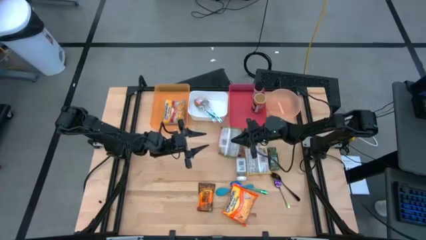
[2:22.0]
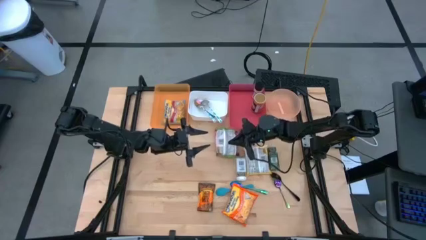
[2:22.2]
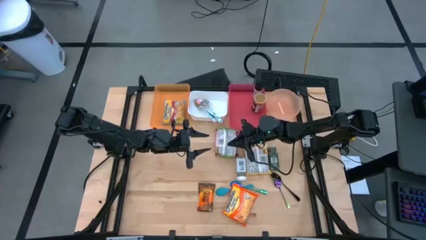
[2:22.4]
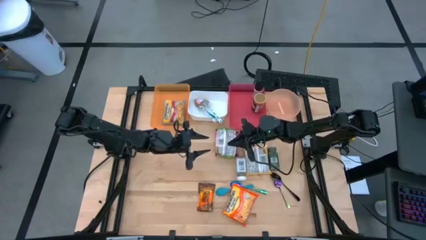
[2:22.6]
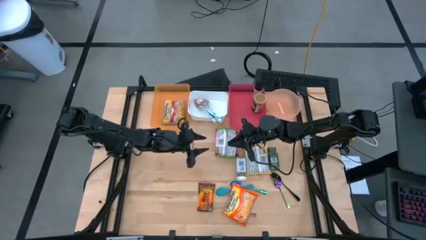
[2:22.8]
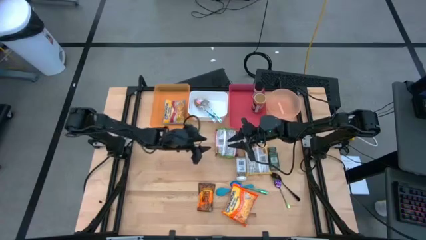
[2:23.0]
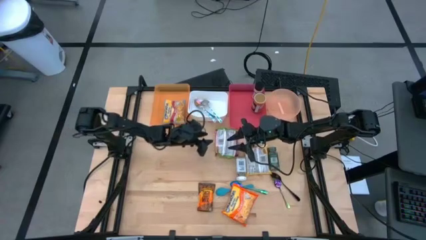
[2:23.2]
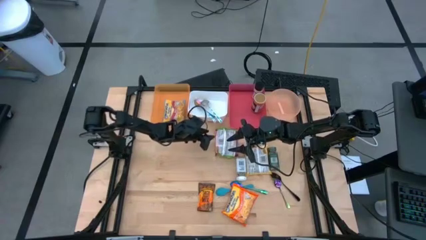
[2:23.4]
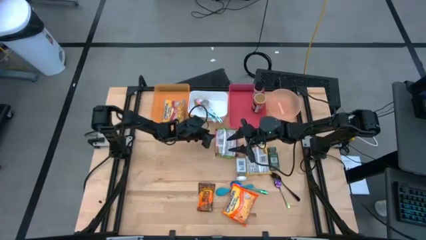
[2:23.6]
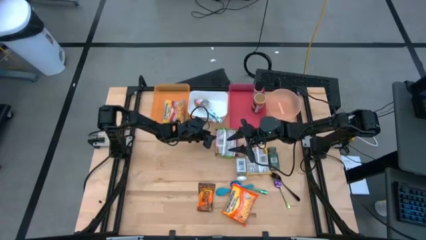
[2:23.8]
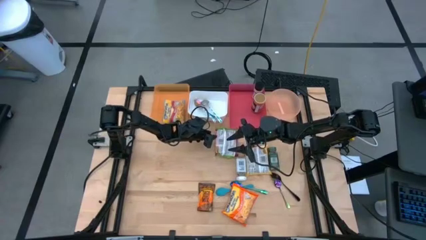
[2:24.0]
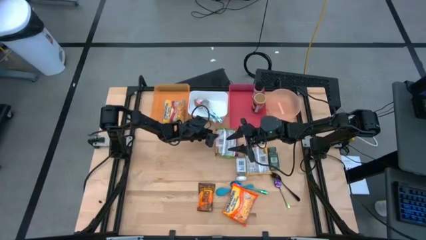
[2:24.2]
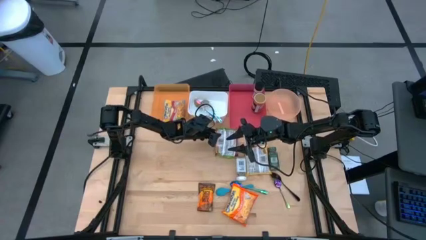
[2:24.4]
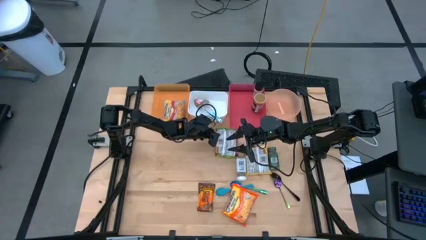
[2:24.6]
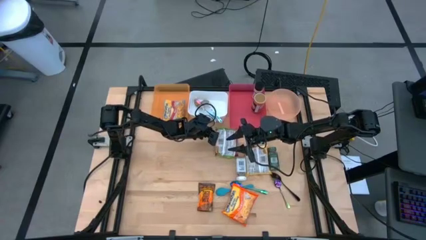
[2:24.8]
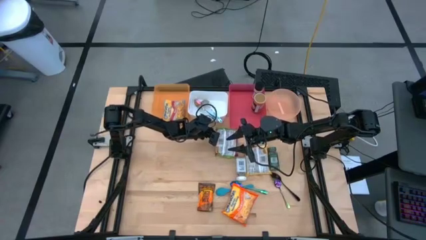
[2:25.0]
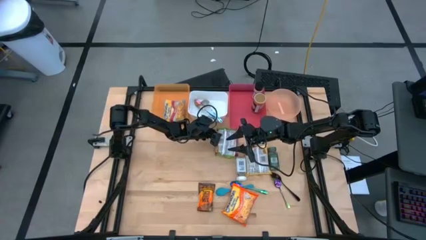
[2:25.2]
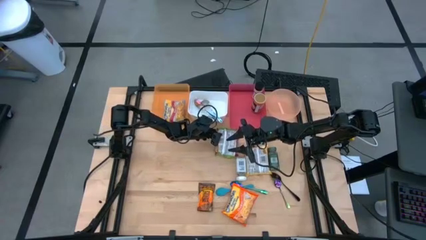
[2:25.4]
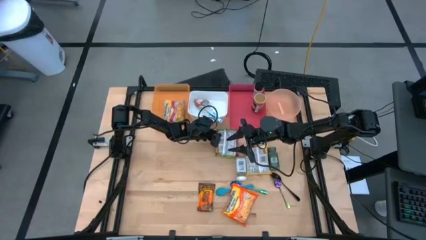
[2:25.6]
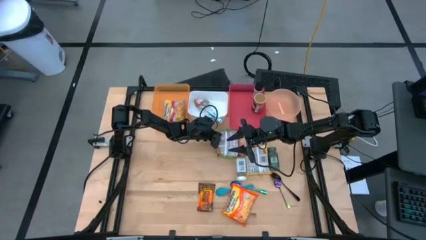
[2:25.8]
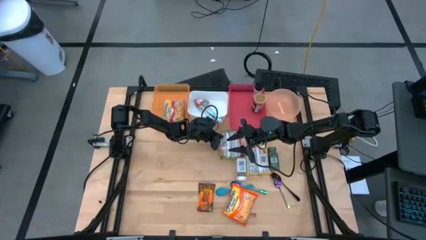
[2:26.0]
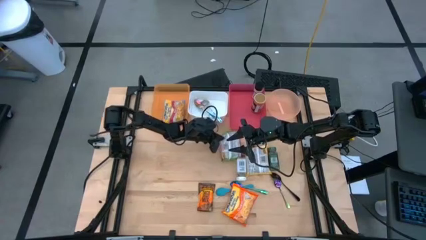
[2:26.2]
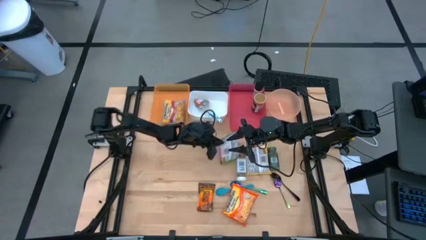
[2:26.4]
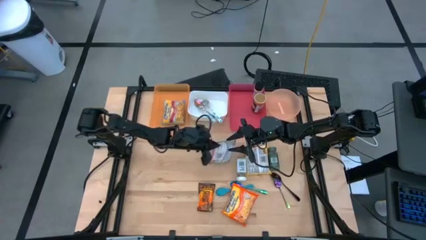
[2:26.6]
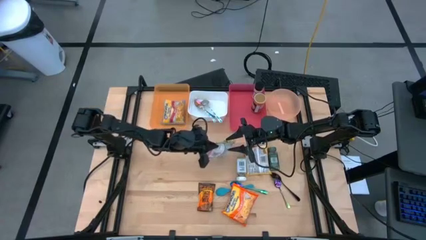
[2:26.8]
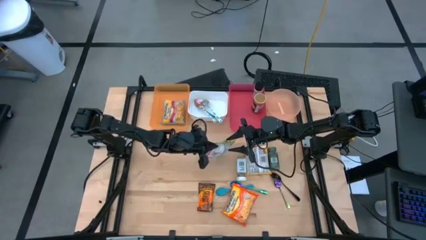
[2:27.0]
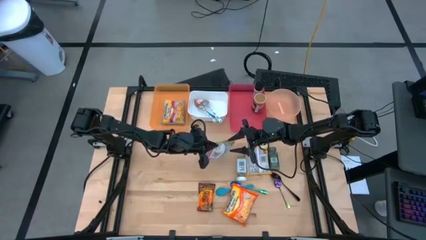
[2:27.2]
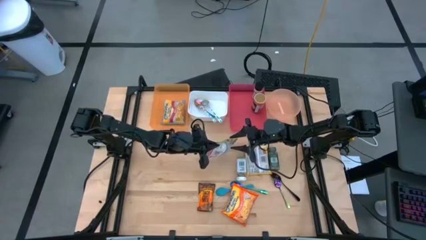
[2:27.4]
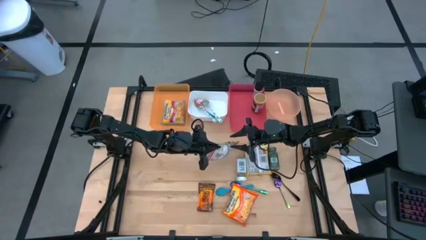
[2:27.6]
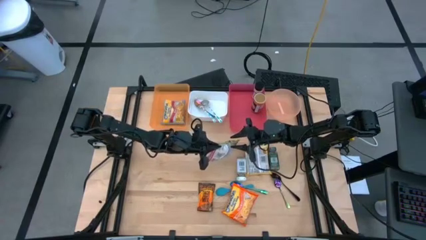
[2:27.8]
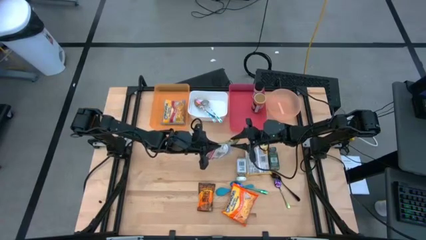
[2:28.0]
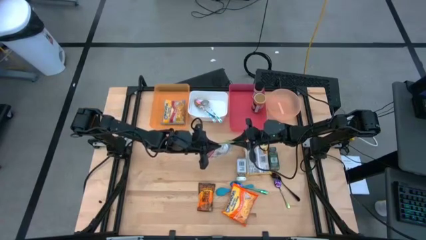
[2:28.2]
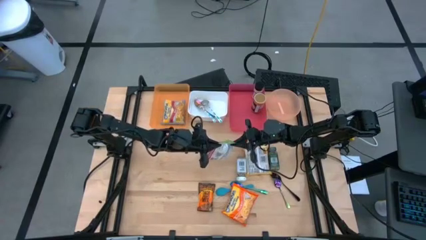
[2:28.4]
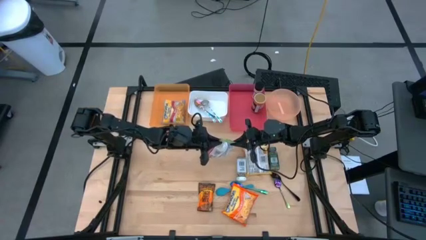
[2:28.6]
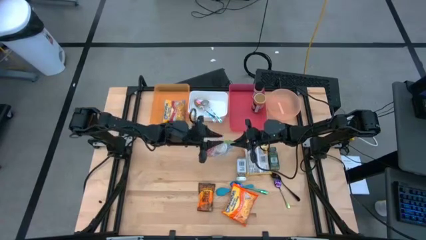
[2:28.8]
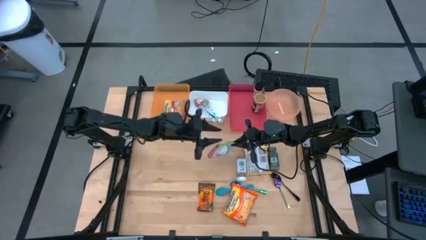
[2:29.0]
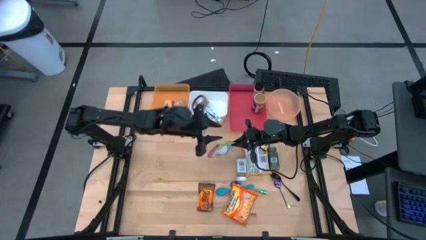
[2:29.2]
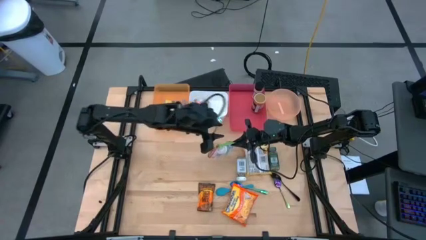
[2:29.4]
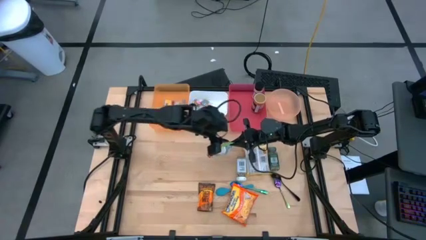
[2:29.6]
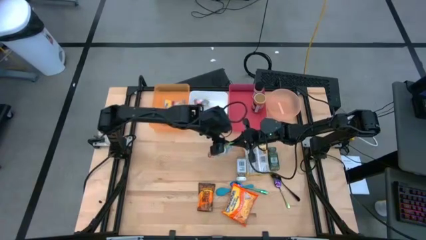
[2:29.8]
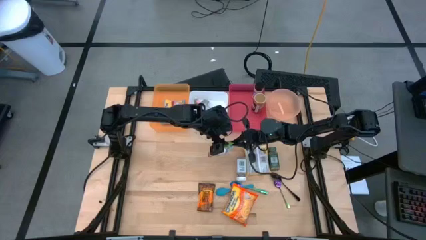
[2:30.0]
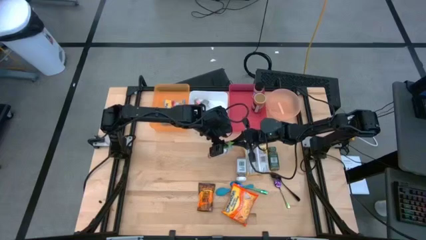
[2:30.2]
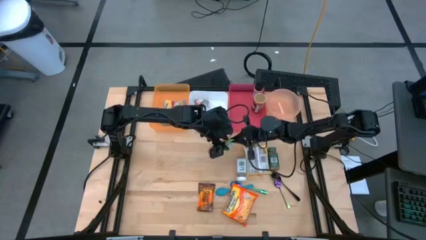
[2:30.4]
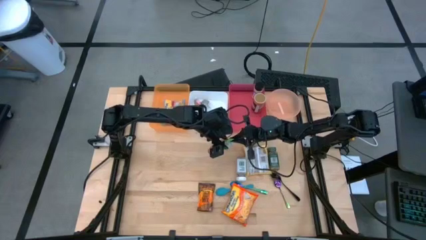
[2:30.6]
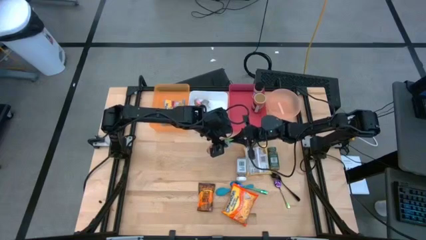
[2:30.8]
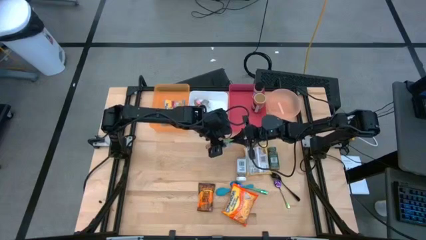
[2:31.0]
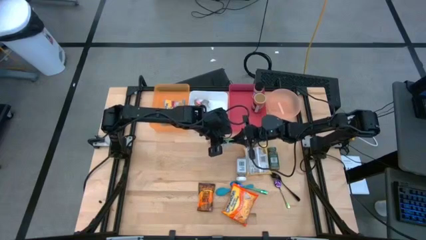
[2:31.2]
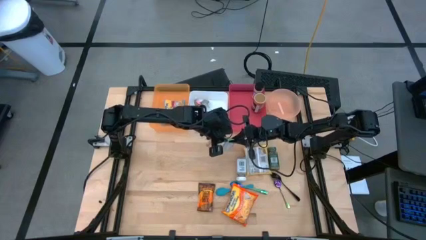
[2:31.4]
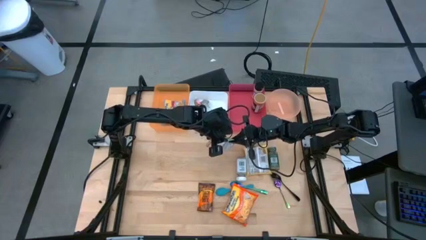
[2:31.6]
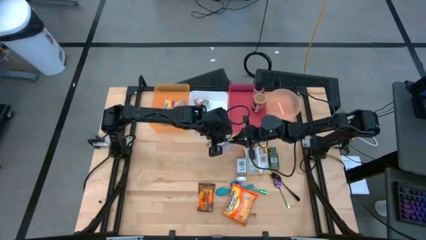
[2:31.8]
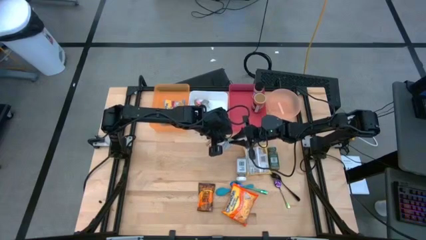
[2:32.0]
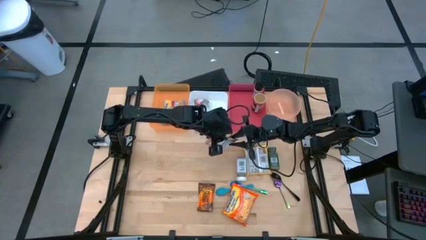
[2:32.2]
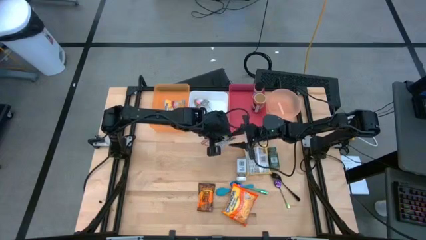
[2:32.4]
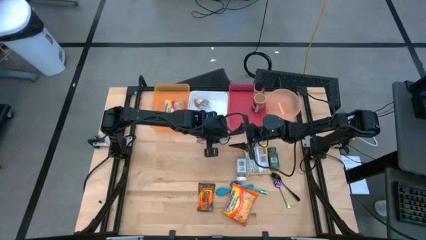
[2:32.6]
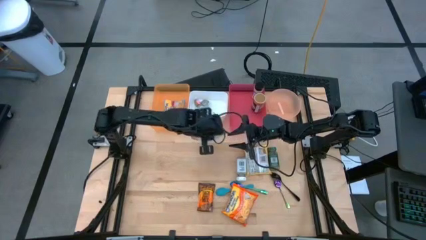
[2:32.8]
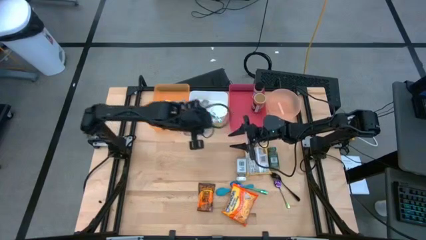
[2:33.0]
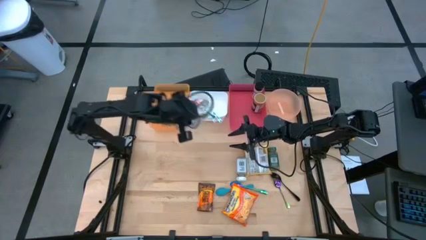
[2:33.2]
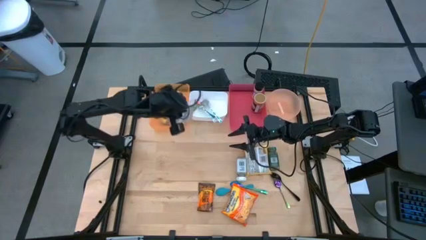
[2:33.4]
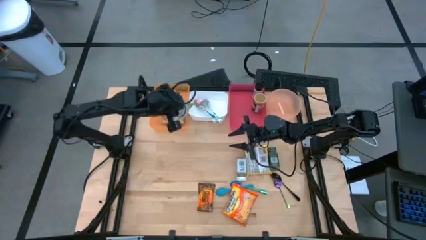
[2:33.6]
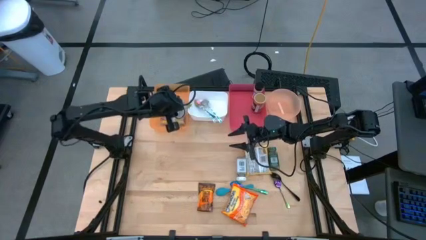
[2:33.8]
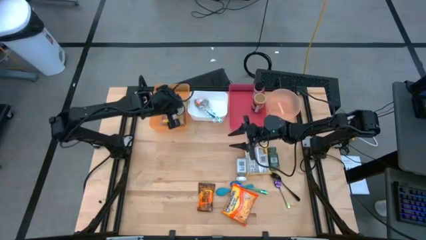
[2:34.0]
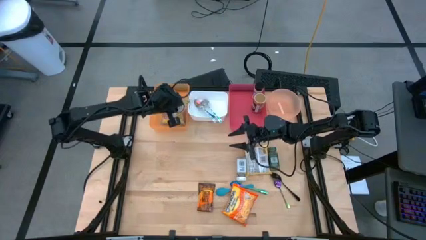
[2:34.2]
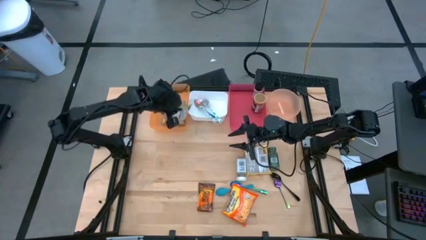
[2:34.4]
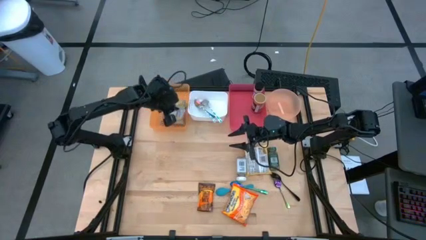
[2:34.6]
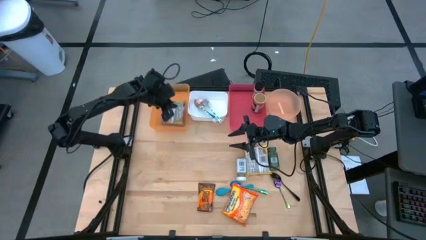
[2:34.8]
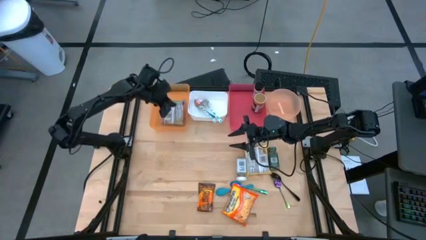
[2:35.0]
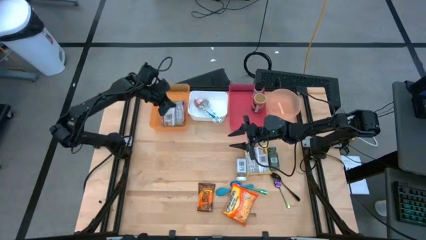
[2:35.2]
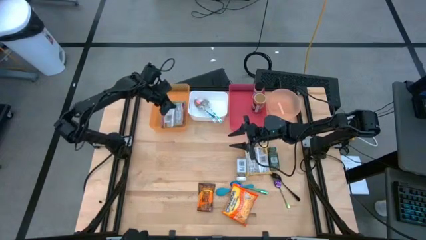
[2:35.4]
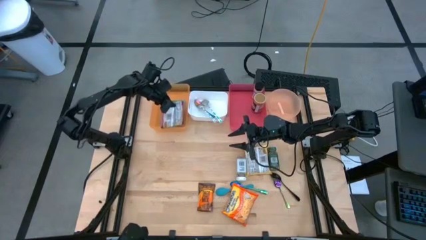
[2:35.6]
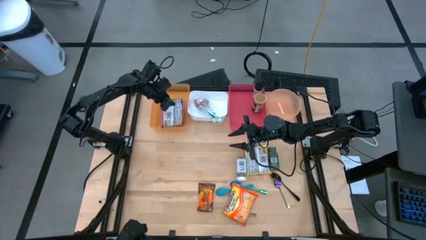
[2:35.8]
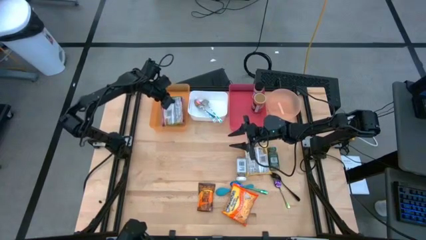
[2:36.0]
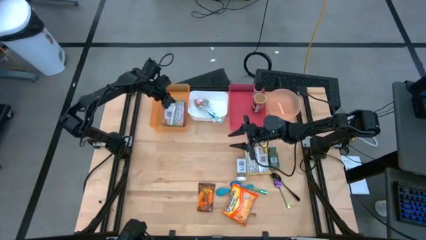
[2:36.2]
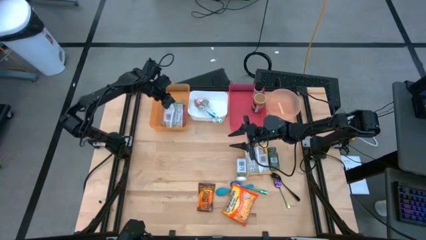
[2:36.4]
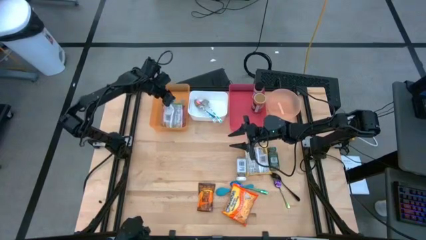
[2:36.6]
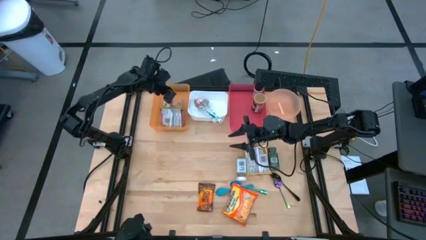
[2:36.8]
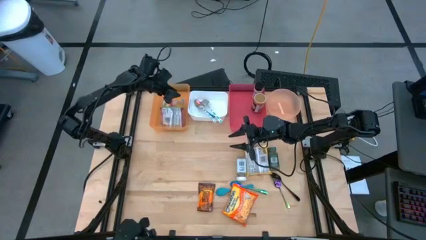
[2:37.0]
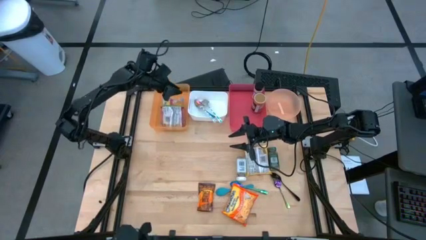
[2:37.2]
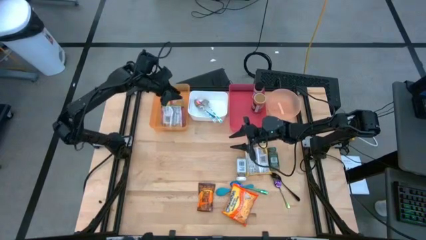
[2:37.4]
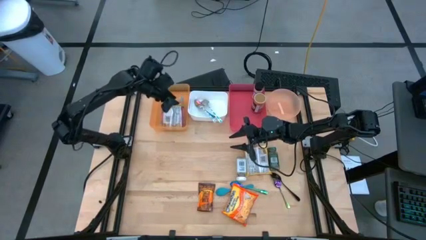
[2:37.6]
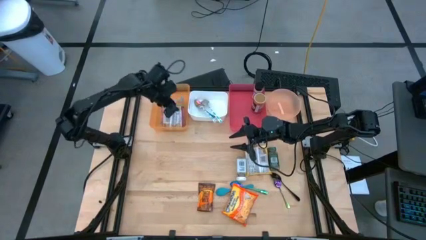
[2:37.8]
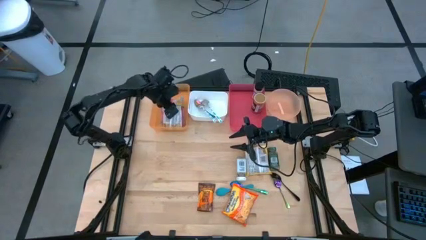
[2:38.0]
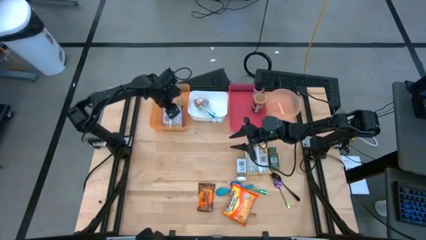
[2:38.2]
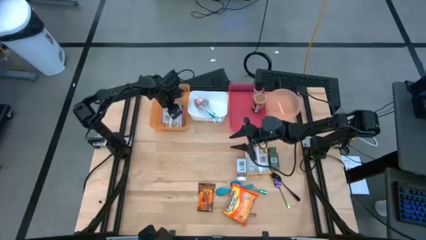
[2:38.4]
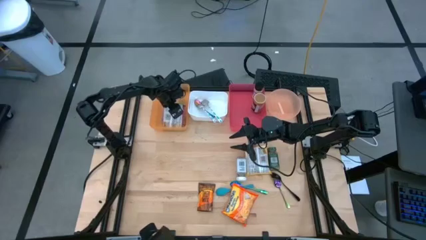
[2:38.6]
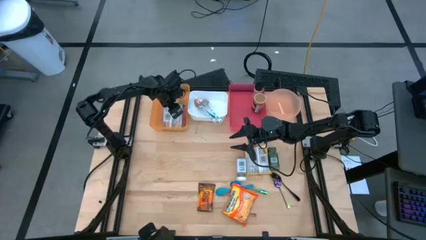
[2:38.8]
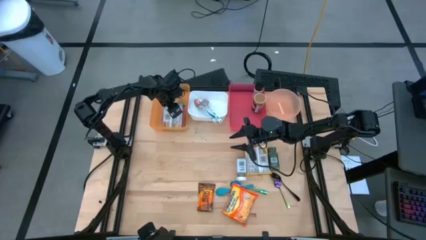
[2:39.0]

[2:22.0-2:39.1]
Task: Pick & Place Food Item
Put the green noodle pack into the orange bin
